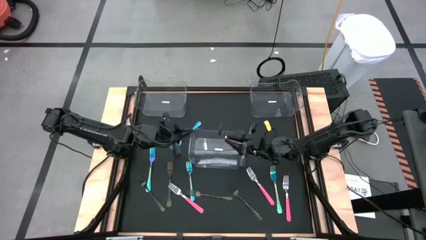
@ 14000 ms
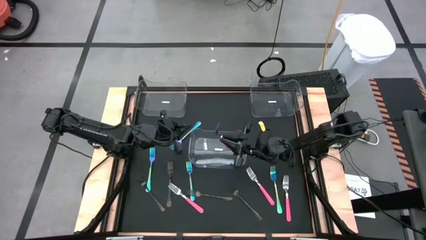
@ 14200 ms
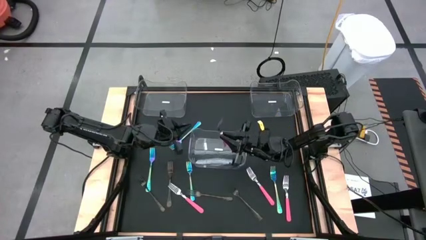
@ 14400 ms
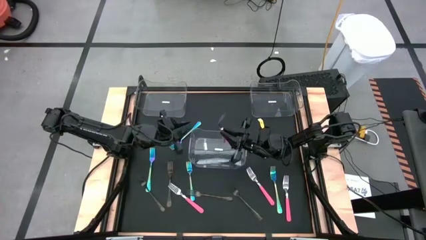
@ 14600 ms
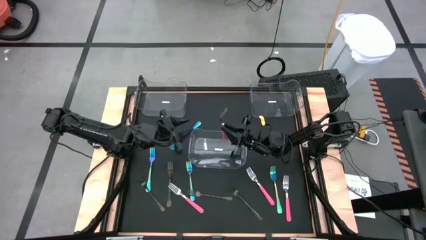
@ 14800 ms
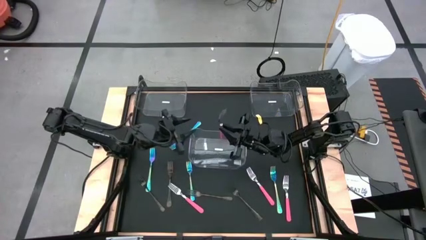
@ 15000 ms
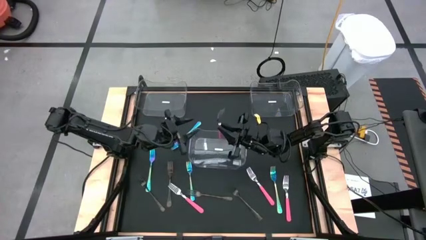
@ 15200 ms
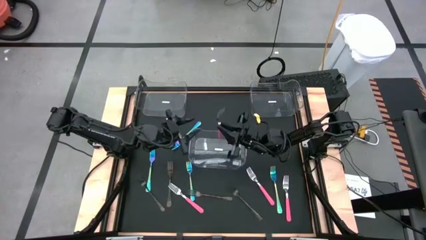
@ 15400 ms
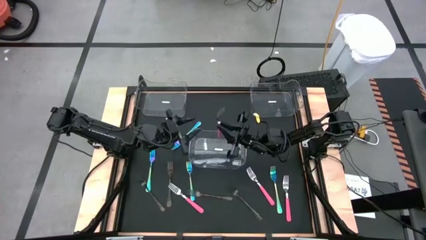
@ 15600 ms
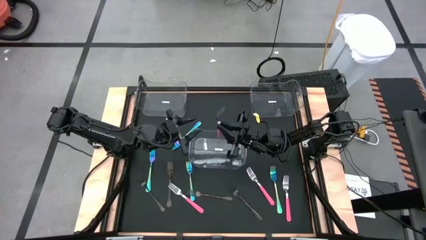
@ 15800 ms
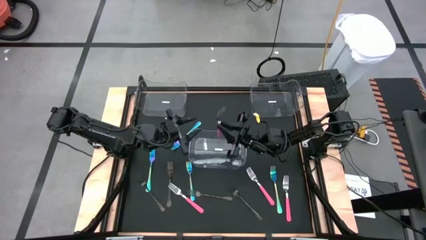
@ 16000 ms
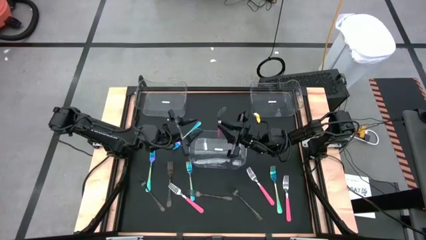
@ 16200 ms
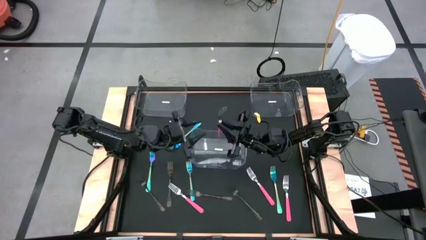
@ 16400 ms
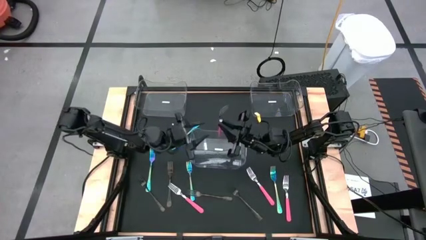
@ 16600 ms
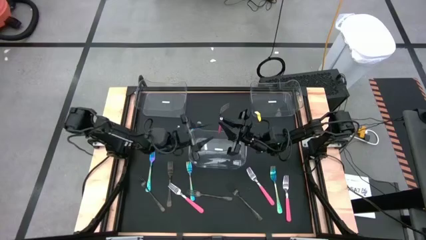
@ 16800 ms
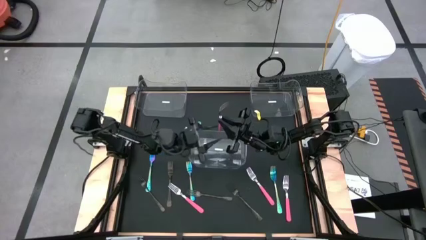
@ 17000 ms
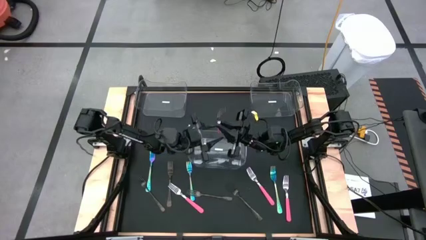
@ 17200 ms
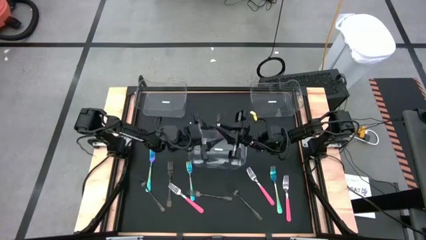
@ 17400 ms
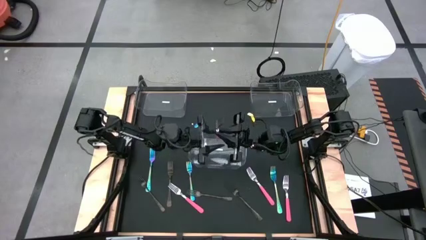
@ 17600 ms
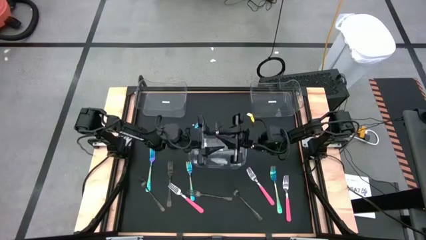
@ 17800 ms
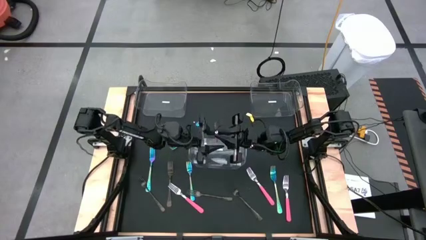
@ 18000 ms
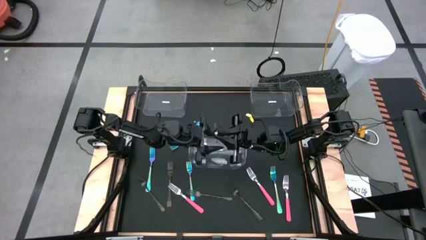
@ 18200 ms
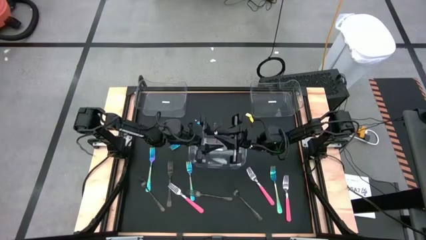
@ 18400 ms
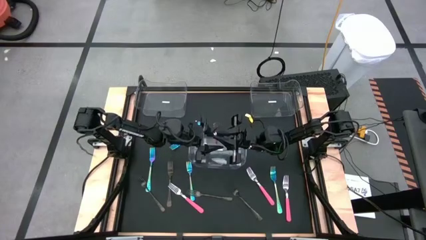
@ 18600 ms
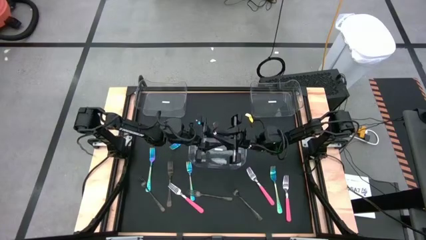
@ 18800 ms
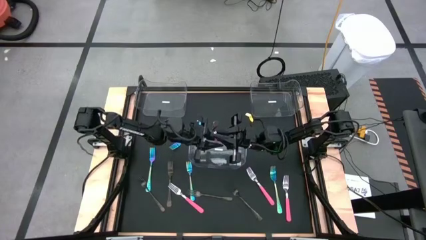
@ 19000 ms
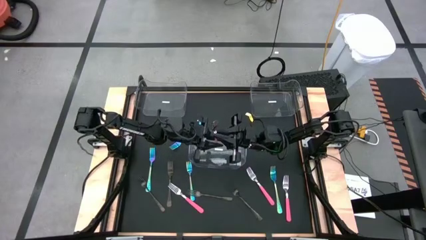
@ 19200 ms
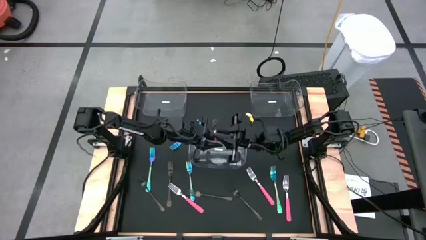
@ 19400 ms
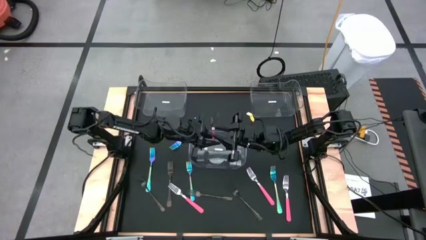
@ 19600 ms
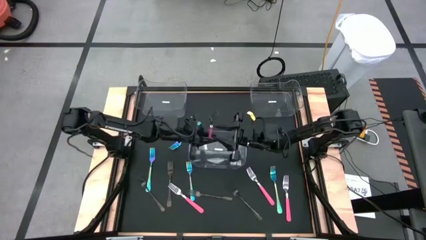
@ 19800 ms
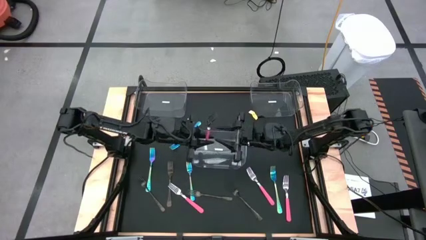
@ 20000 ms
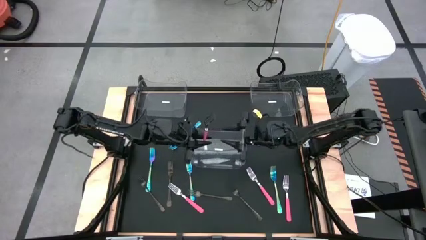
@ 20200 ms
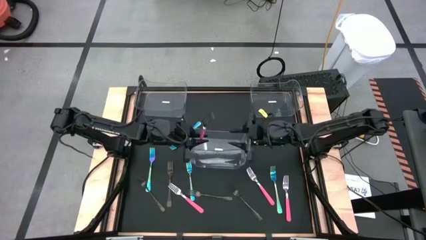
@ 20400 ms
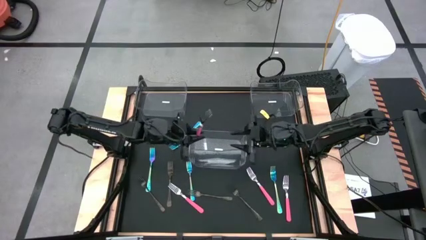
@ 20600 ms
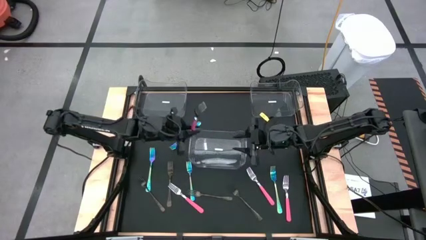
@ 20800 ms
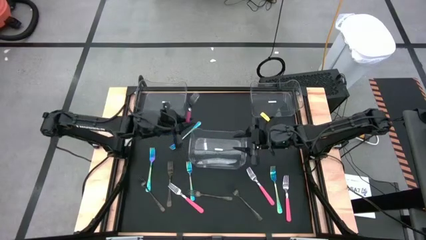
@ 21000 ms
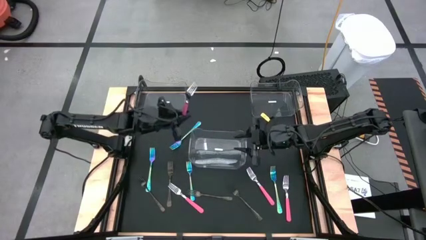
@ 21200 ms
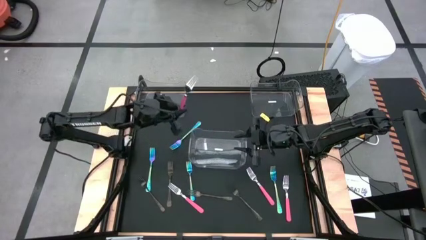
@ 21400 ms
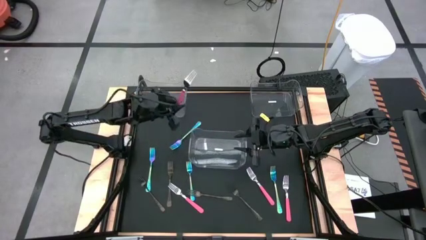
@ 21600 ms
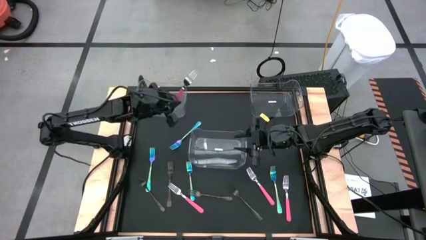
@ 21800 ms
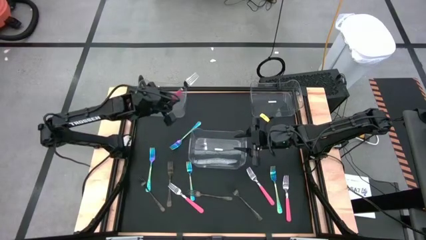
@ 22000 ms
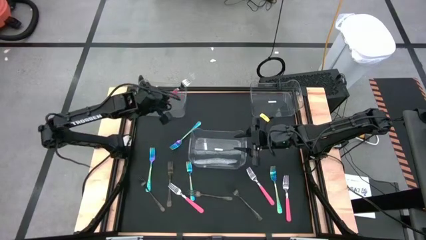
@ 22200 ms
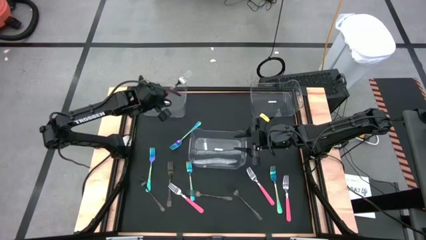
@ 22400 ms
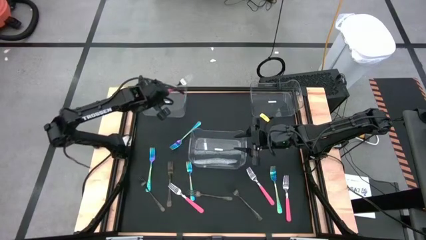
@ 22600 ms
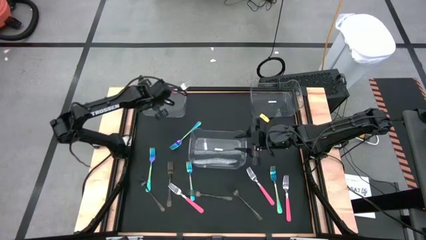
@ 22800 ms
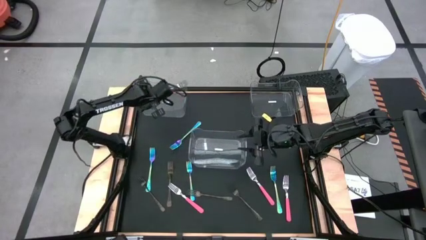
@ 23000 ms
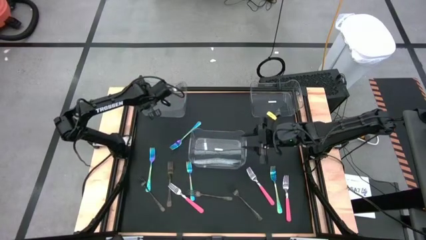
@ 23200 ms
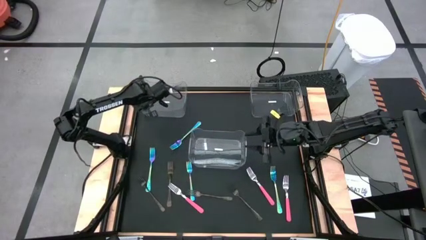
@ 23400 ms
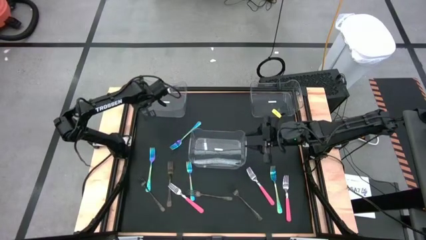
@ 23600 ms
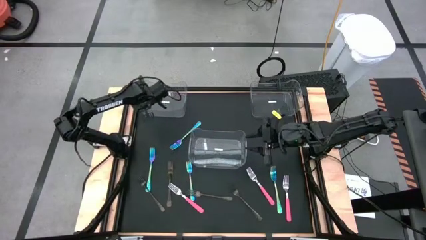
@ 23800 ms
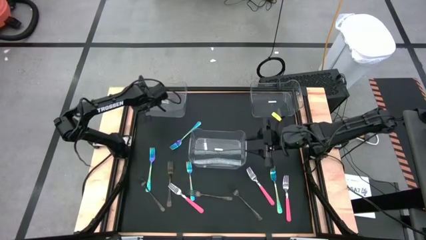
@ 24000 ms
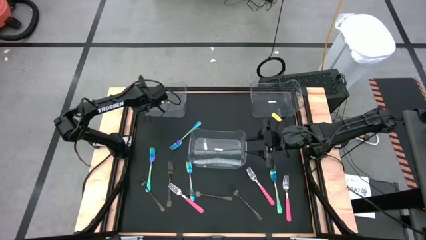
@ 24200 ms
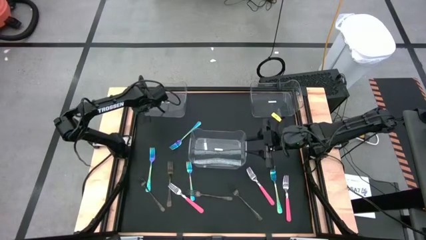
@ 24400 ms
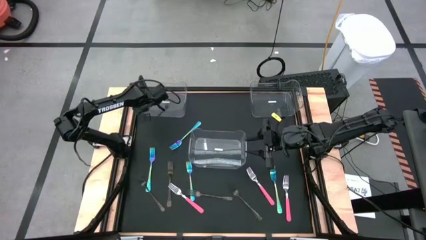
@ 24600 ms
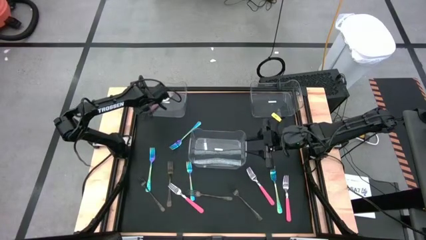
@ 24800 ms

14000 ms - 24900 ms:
Task: Sort silverware by color (type)
Put the pink fork into the left transparent bin

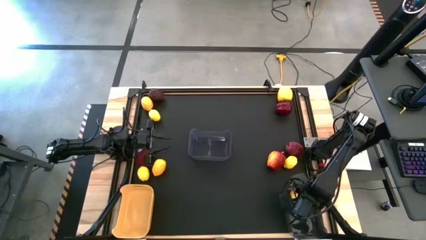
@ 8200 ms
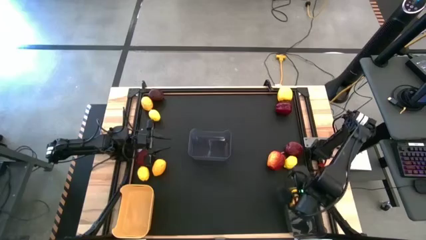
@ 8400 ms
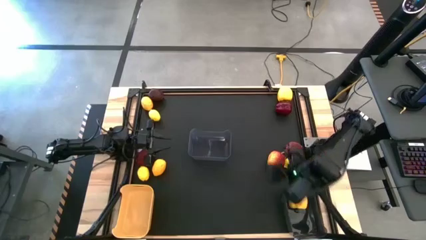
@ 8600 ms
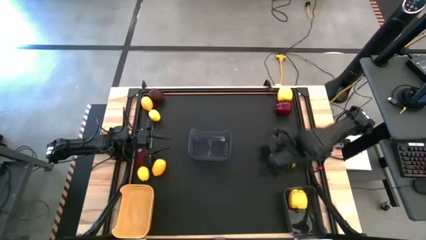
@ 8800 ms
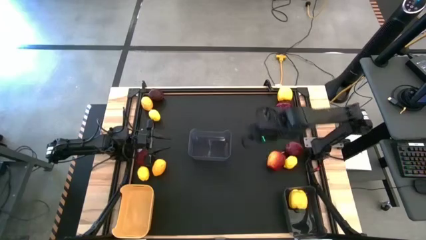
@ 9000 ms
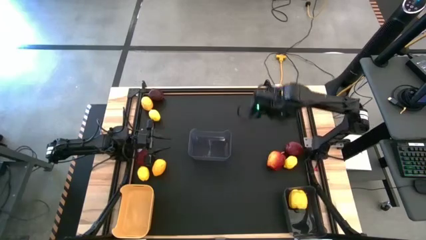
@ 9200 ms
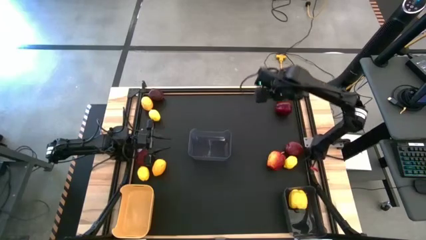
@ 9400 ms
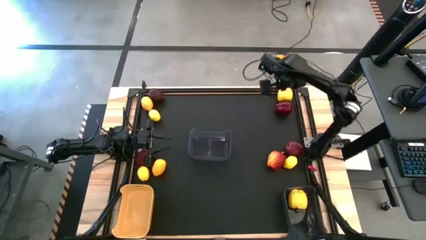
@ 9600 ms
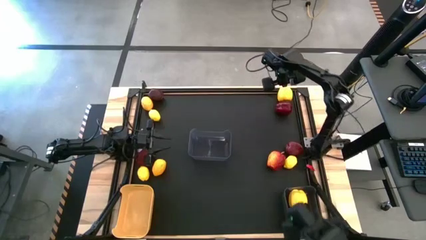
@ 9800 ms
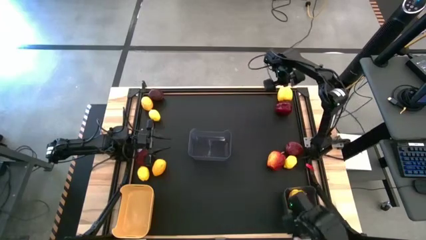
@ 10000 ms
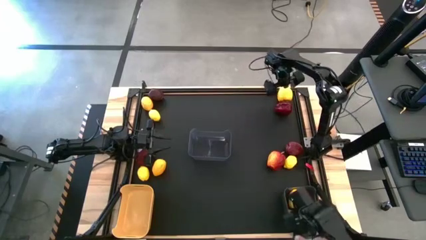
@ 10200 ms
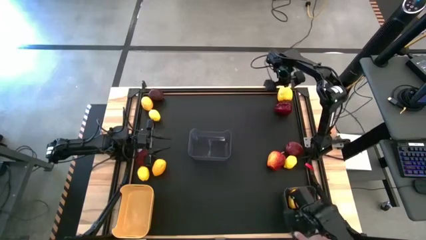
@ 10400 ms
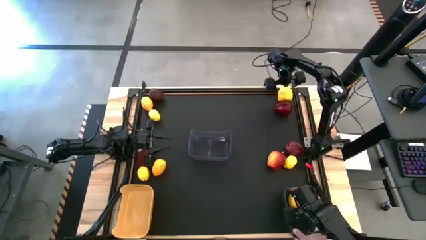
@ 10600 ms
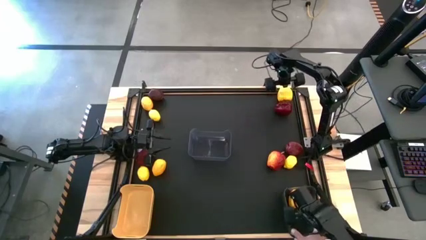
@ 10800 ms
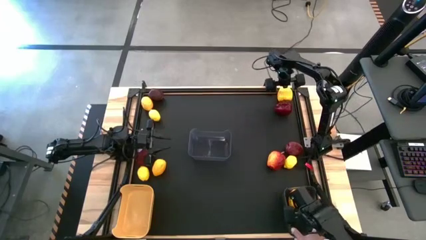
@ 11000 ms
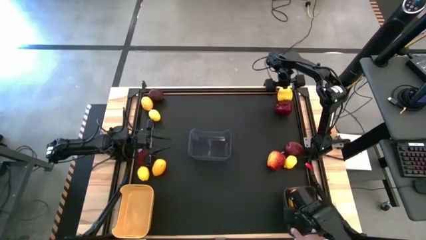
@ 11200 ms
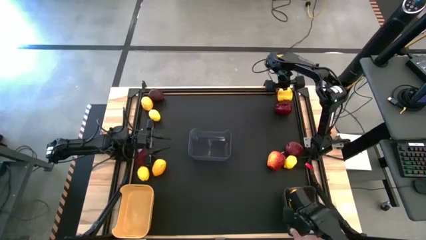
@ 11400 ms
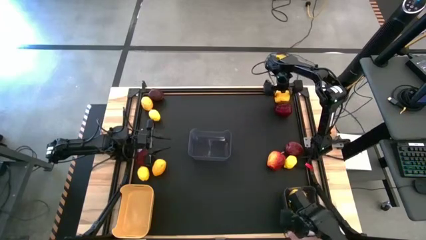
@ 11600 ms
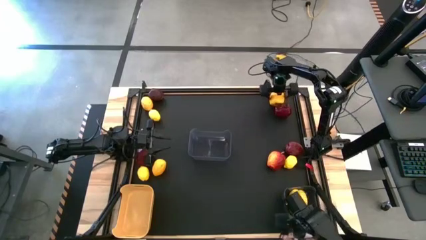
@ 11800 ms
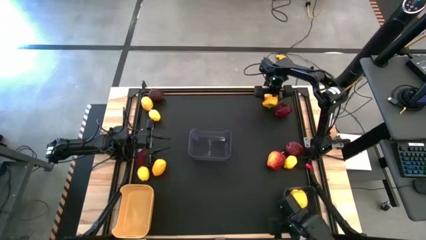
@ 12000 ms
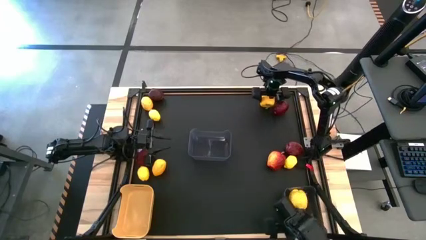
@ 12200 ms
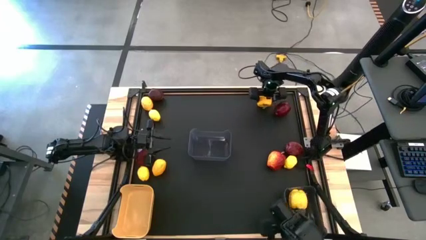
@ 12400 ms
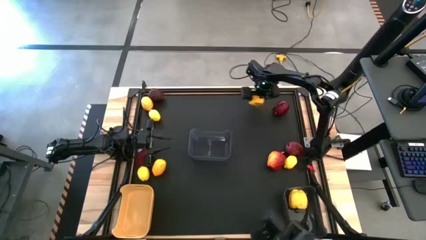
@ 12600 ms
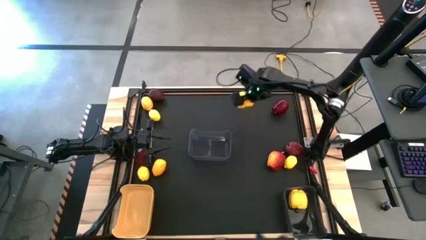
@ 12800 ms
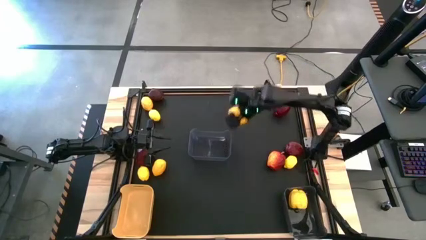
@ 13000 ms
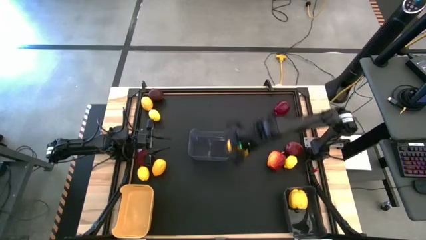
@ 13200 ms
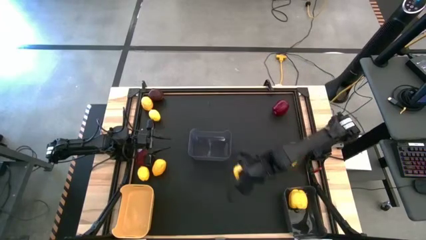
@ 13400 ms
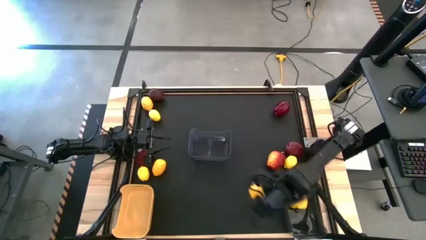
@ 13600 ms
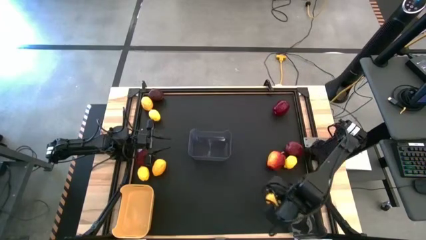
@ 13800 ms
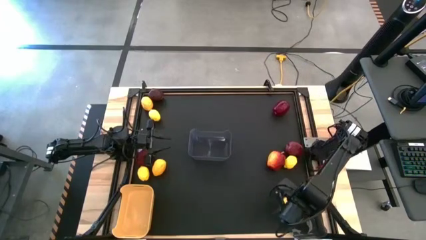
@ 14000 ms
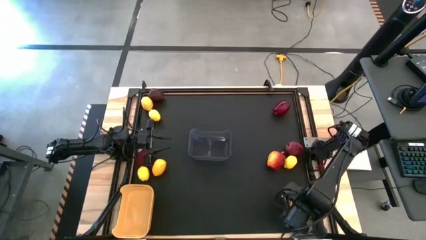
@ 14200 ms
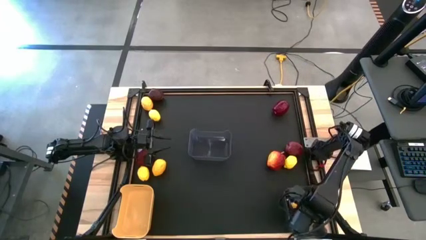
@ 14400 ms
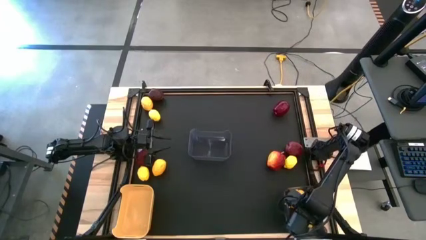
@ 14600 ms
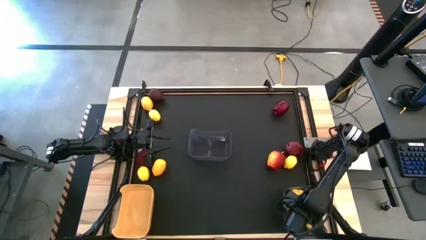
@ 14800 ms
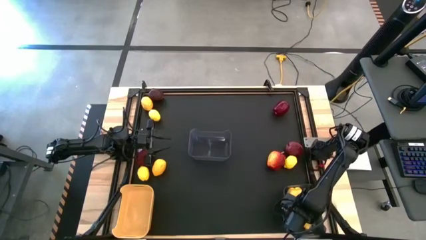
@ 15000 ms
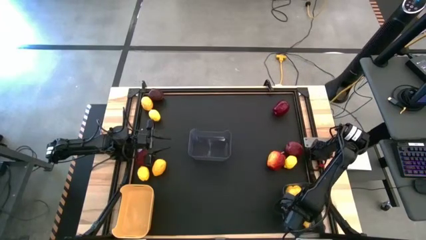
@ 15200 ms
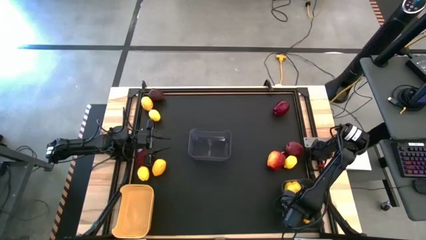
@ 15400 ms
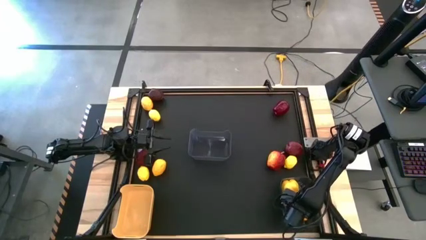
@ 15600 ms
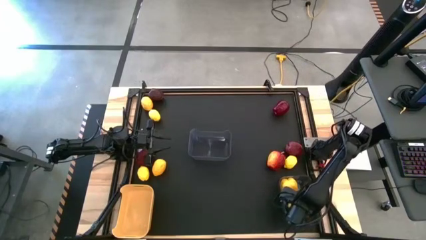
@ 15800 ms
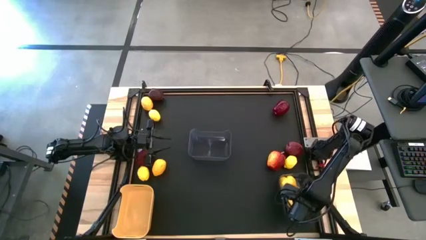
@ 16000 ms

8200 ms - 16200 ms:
Task: Sort produce into baskets
Put the yellow bell pepper into the bottom black bin
